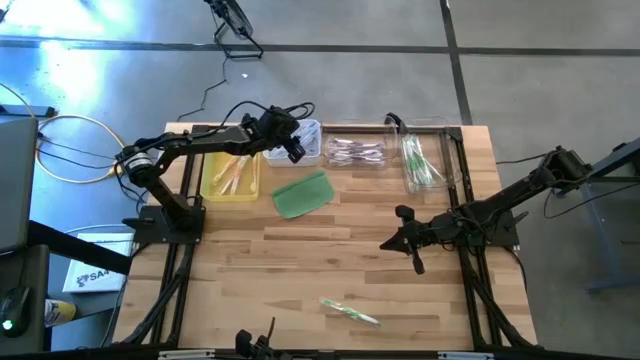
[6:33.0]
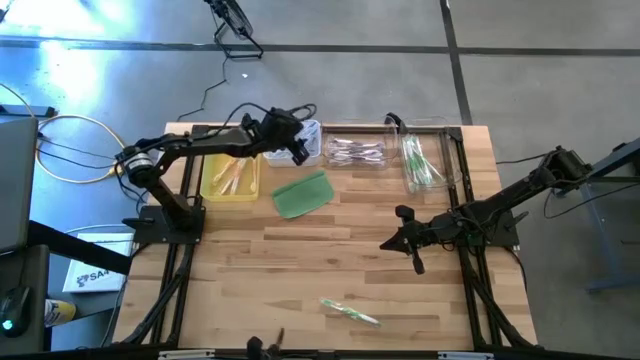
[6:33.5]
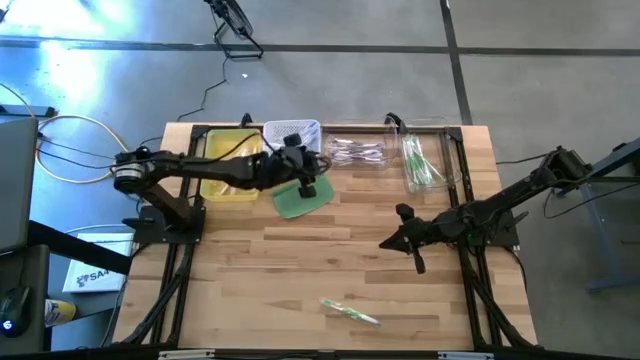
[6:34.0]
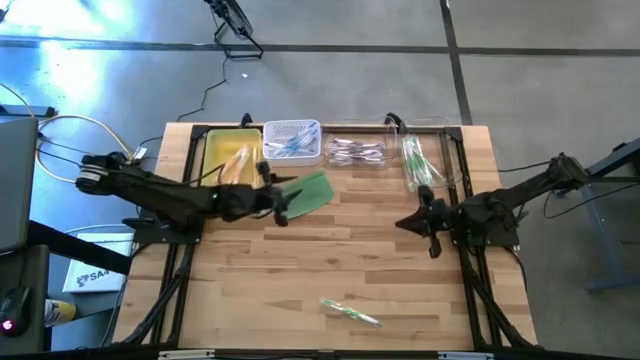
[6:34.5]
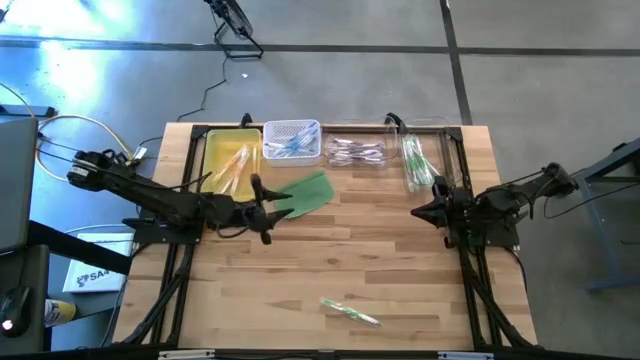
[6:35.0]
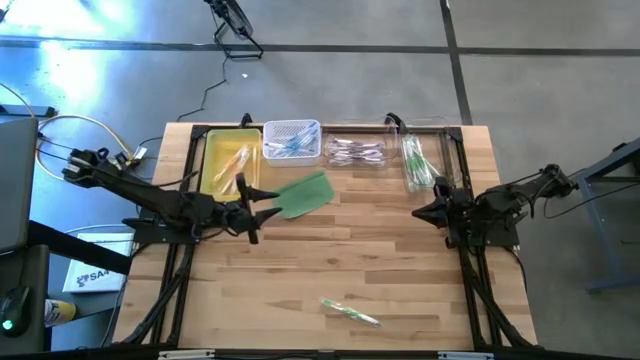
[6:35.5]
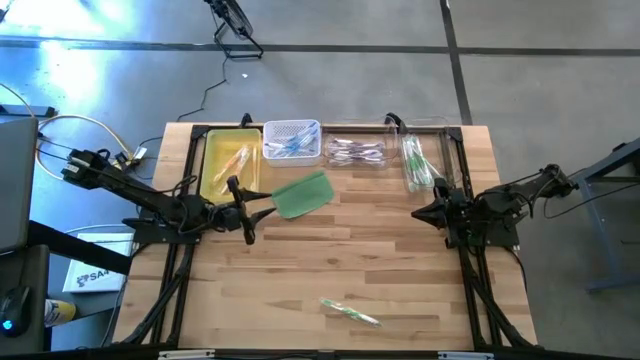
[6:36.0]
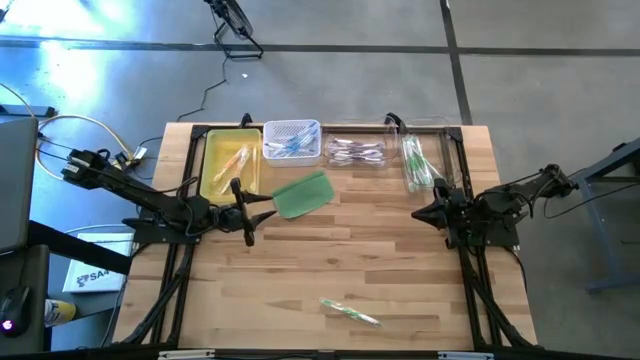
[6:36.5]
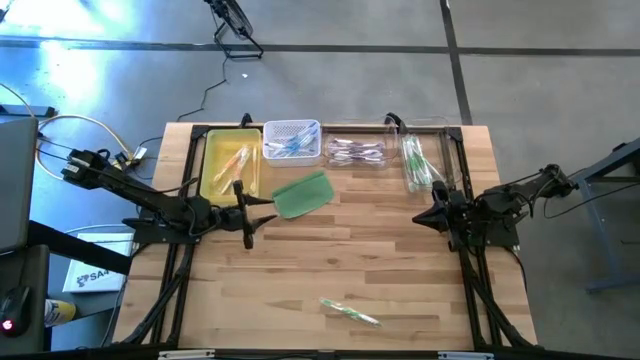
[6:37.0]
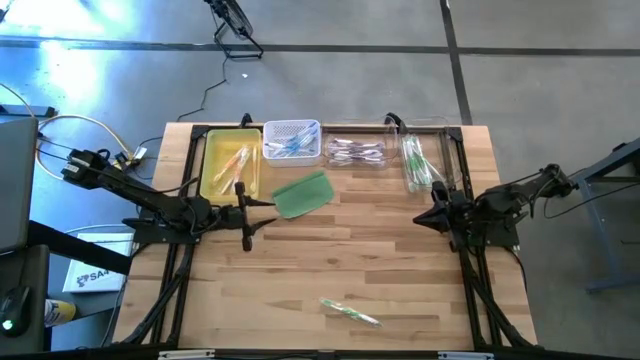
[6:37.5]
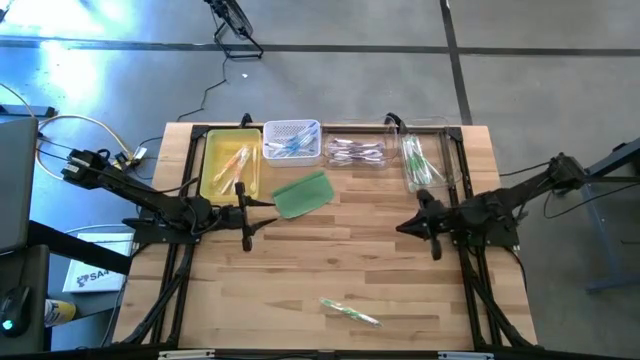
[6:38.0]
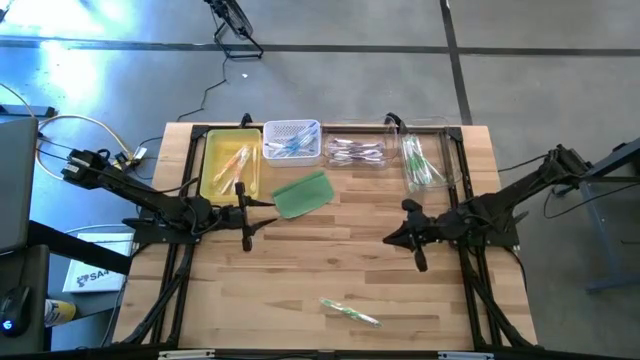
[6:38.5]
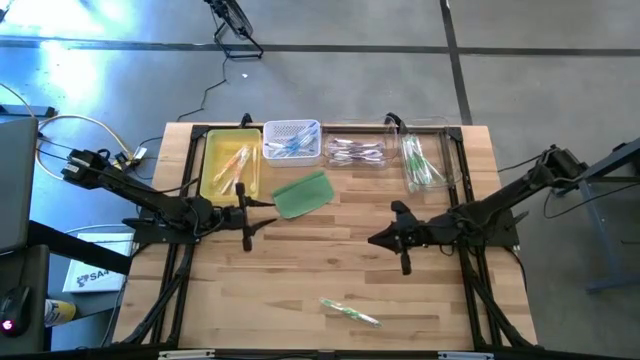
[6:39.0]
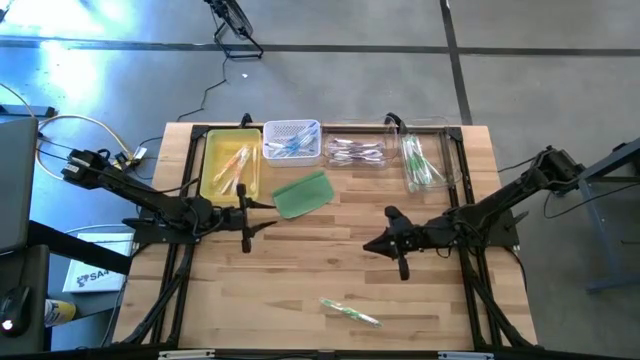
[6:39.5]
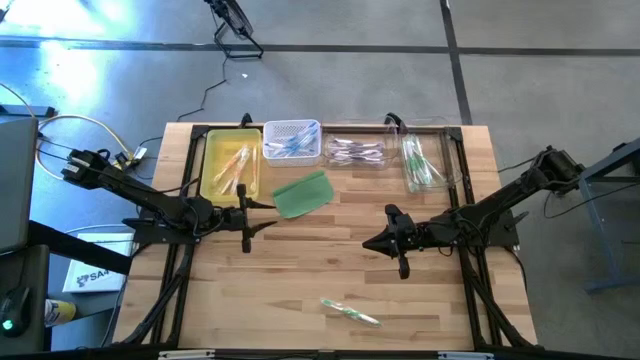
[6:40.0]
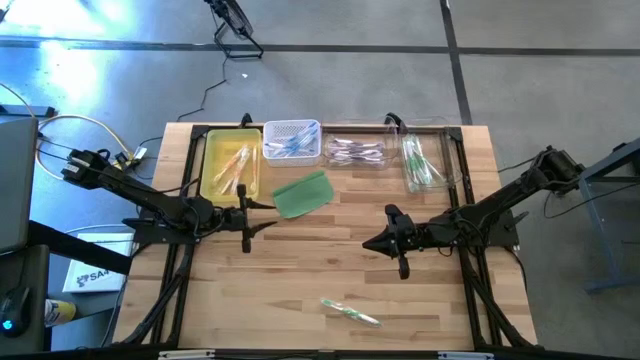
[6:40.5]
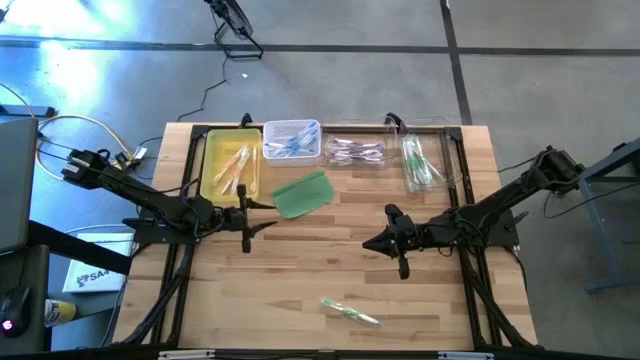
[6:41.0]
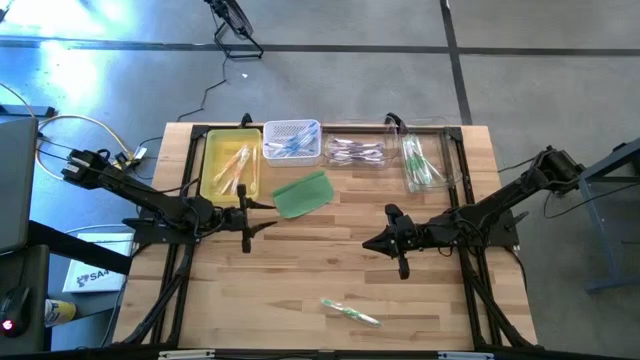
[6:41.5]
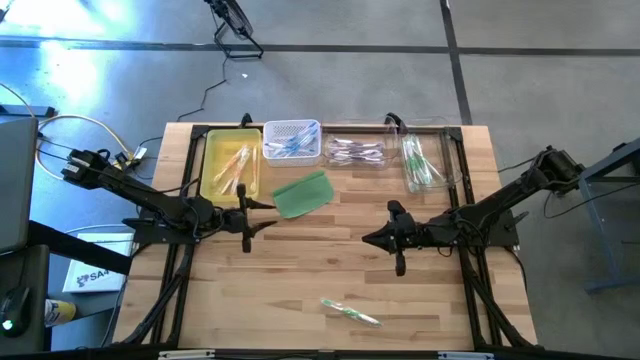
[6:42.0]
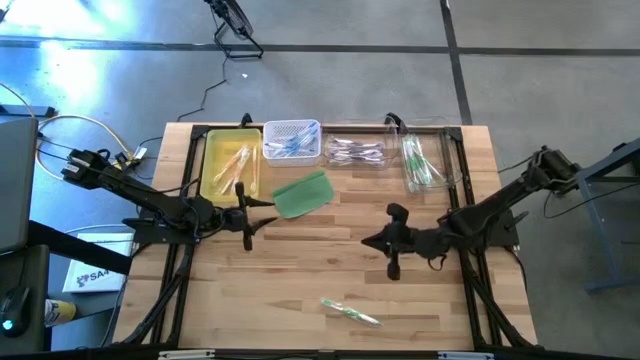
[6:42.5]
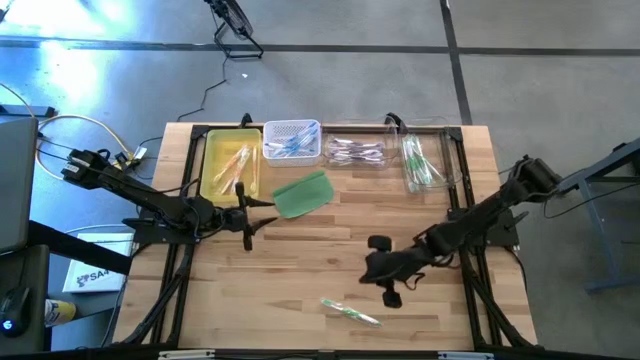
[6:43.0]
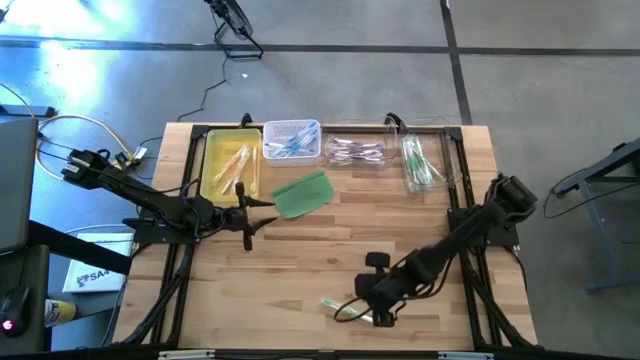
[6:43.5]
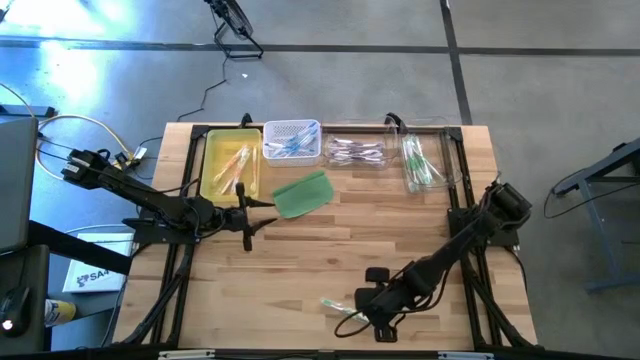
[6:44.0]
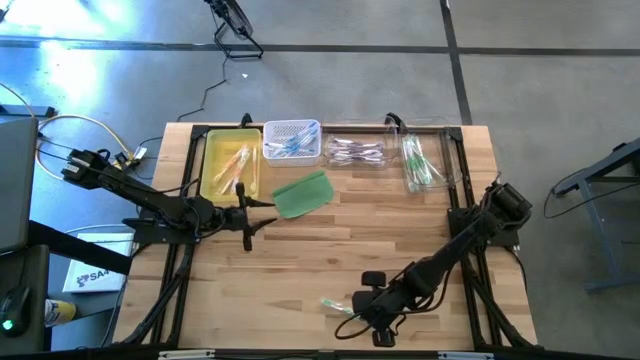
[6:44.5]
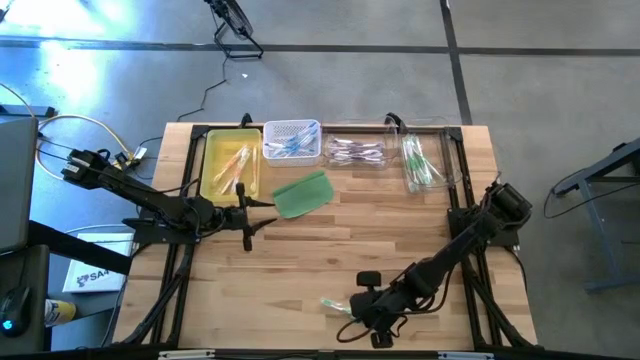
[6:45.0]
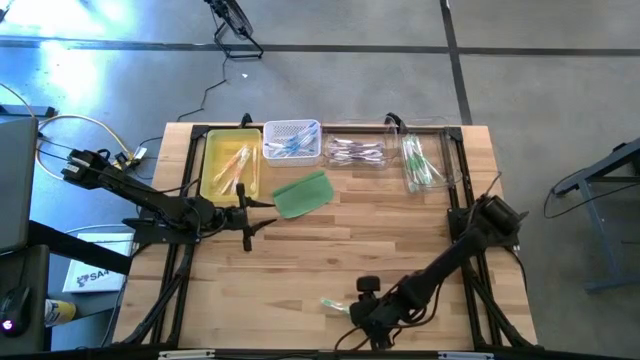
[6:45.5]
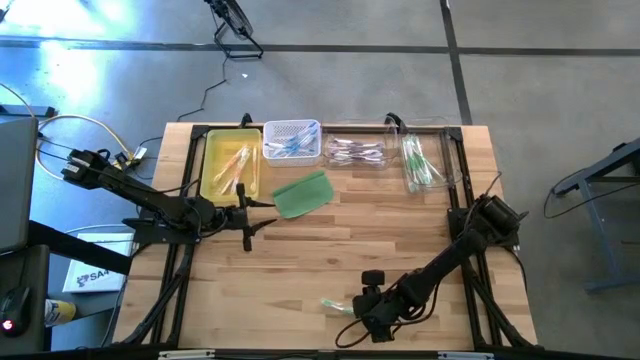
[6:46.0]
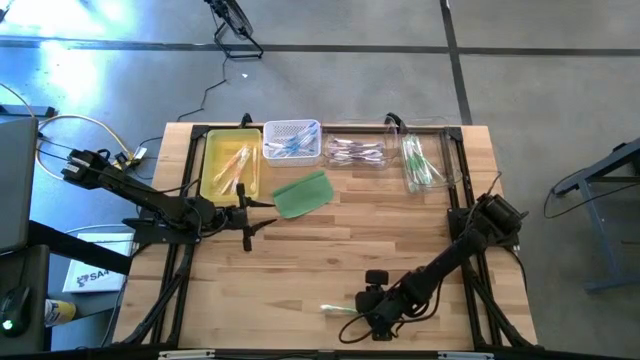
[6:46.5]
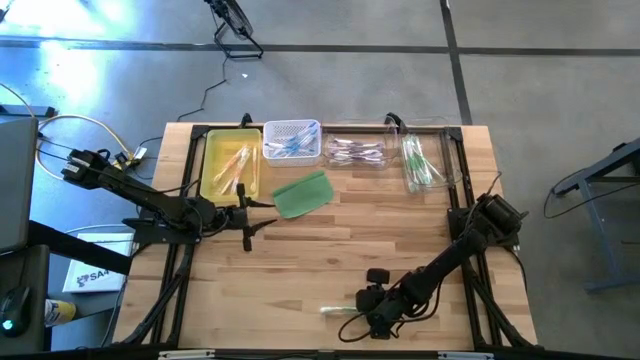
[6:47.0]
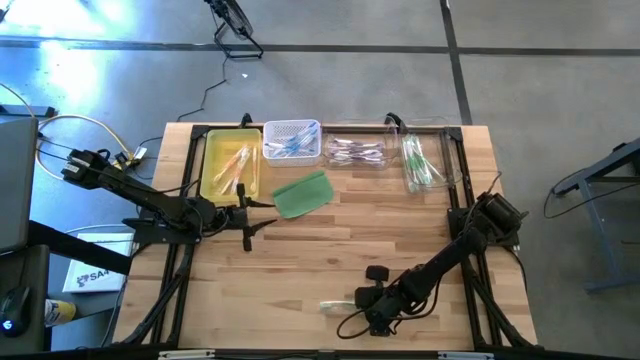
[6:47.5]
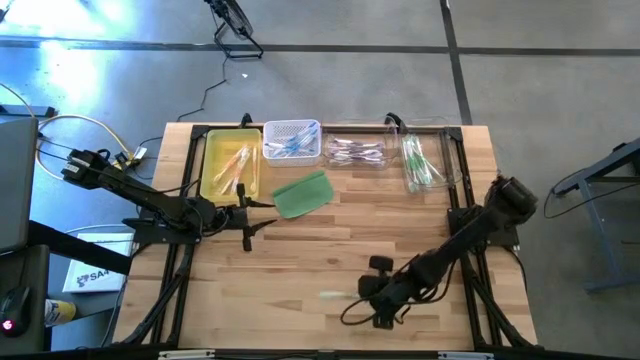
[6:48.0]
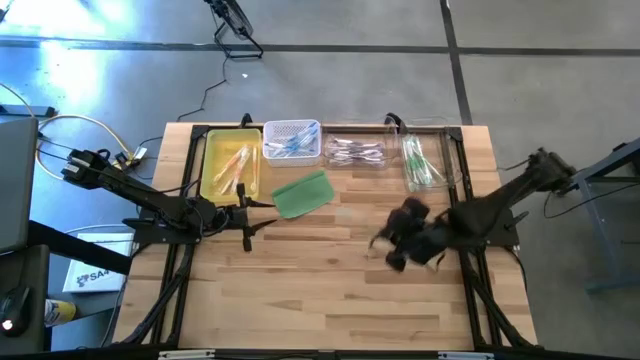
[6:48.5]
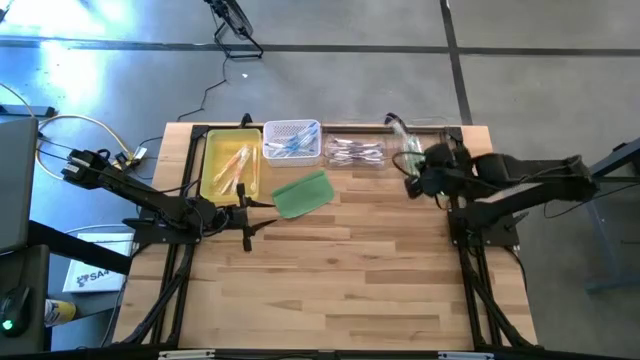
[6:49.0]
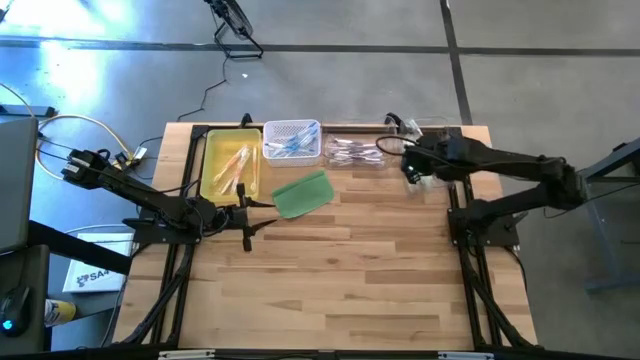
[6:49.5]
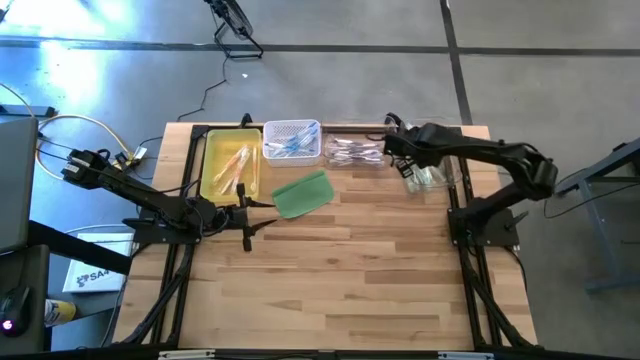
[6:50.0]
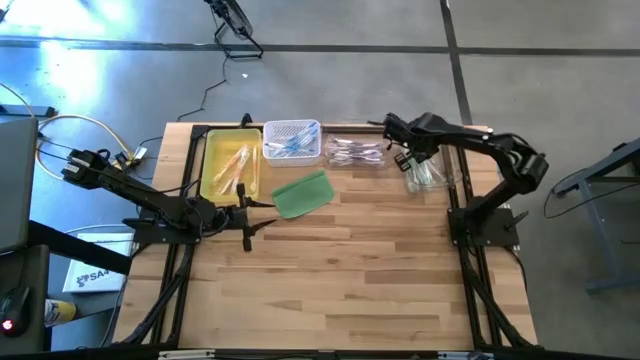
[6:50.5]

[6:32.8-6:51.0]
Task: Pick & Place Toothbrushes
Put the green toothbrush into the right transparent bin

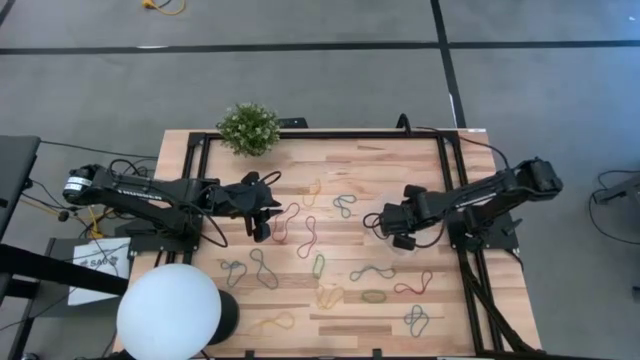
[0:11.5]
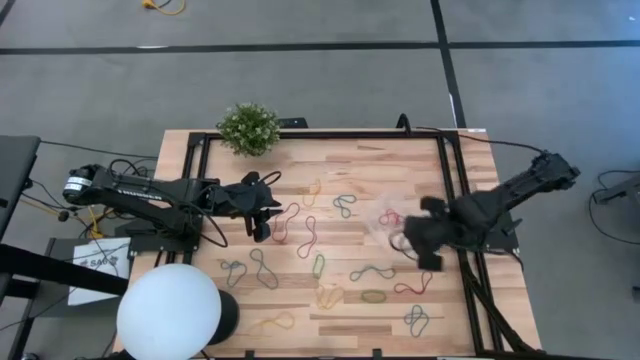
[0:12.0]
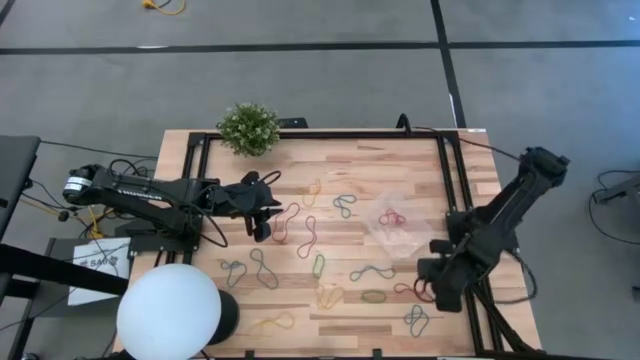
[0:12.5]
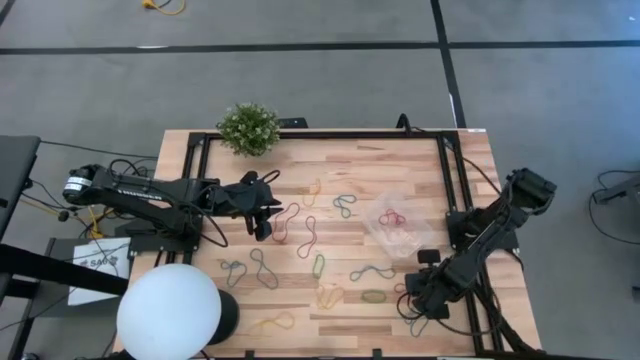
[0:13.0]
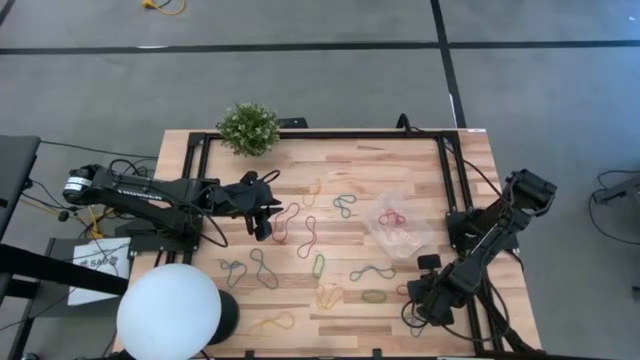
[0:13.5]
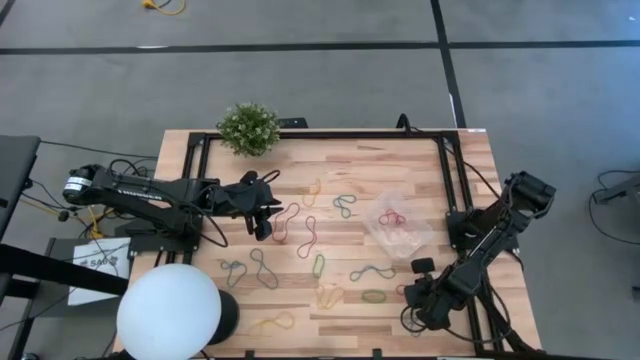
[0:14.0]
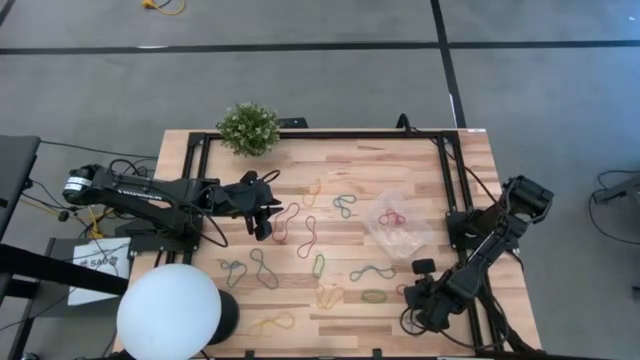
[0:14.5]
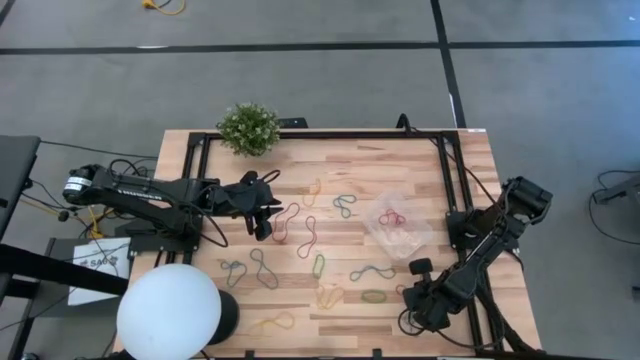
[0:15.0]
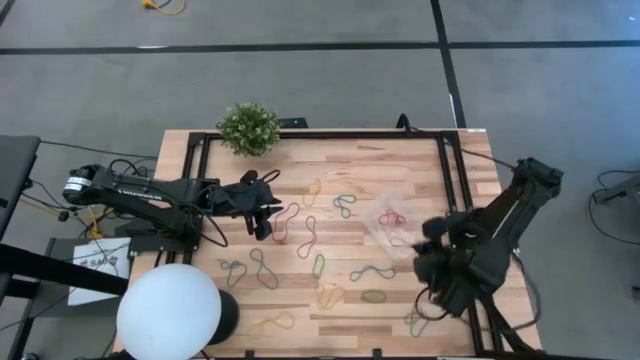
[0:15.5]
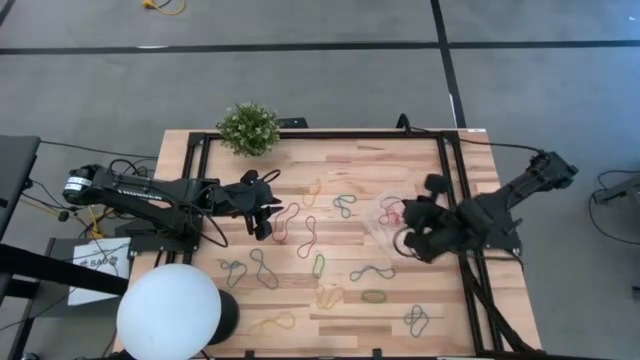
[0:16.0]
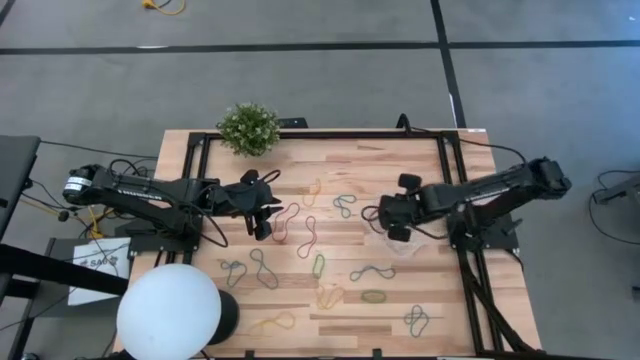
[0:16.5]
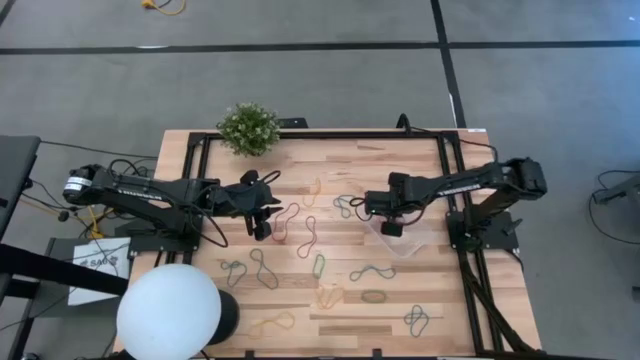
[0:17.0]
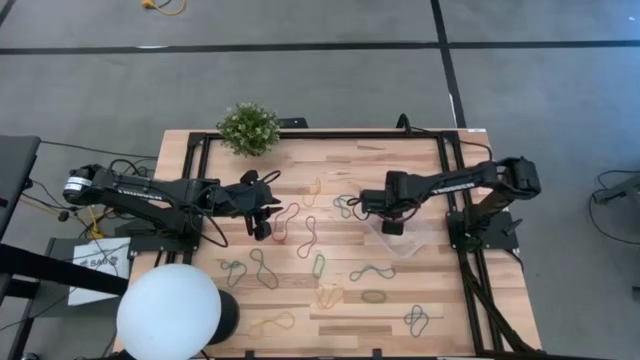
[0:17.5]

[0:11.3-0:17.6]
Task: Pick and place items into bin
Put the red rubber band into the transparent bin
